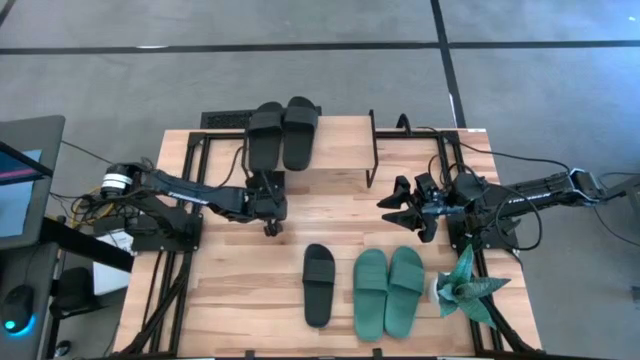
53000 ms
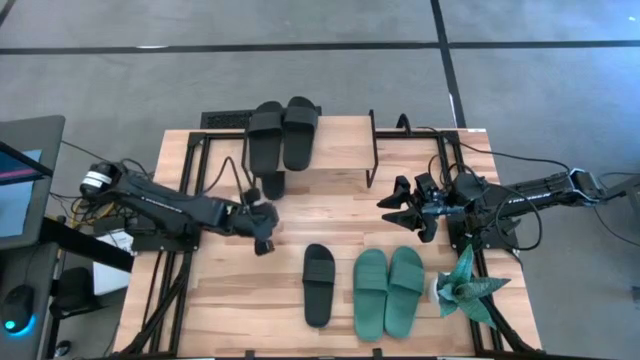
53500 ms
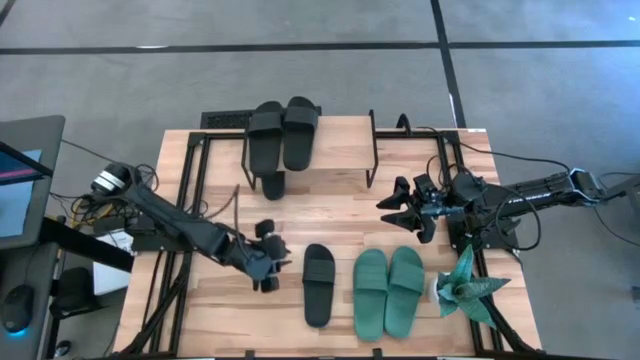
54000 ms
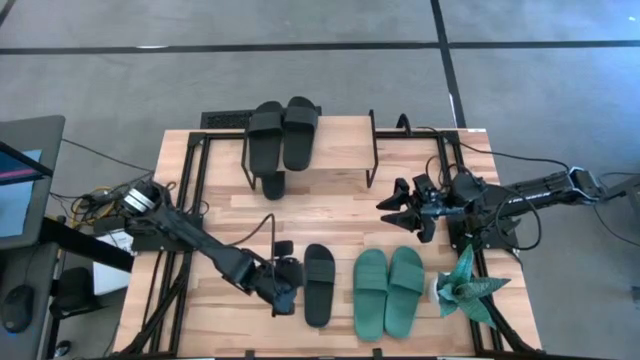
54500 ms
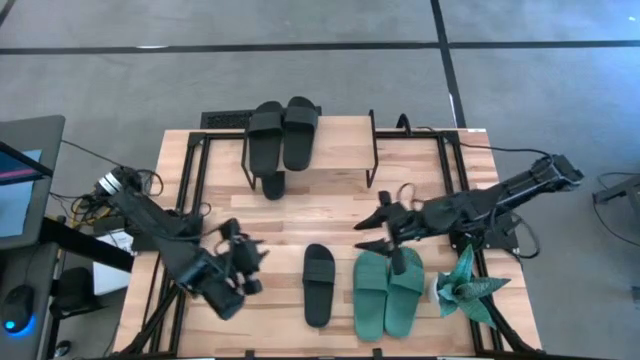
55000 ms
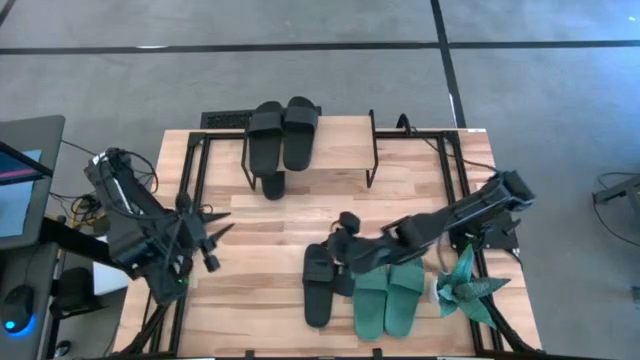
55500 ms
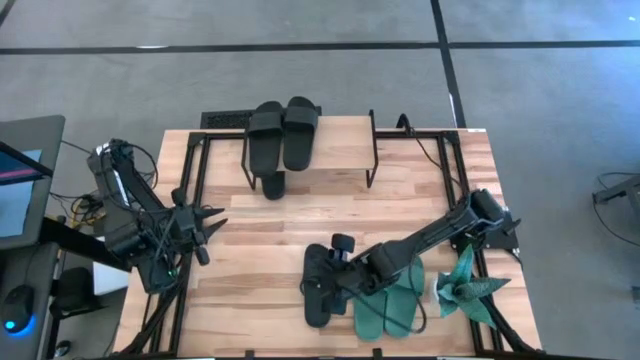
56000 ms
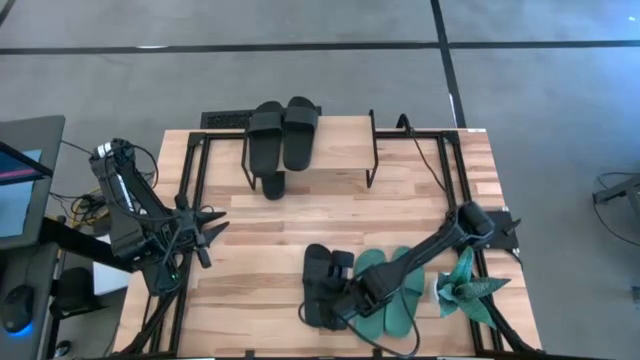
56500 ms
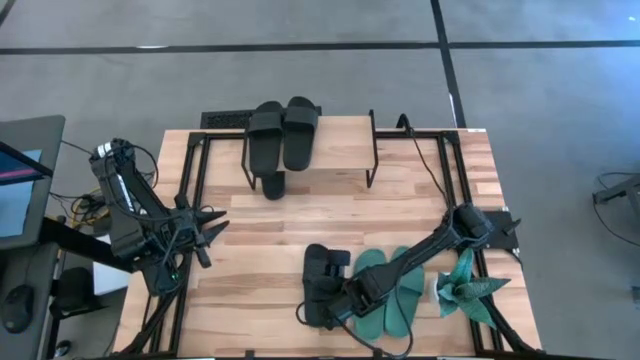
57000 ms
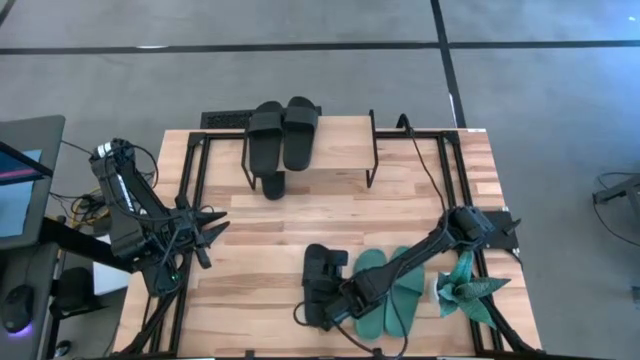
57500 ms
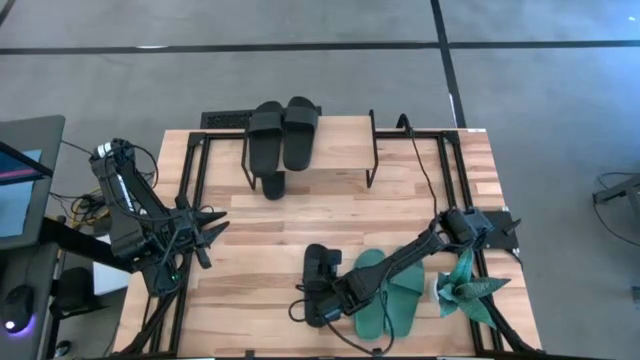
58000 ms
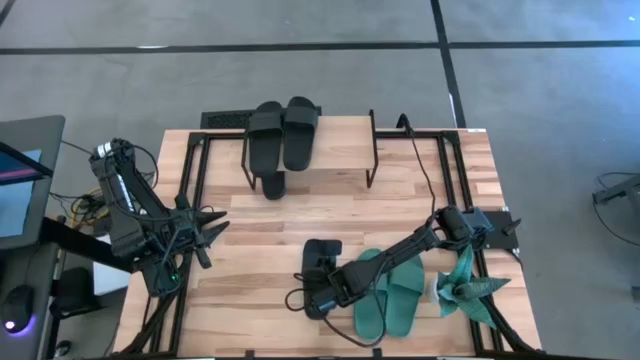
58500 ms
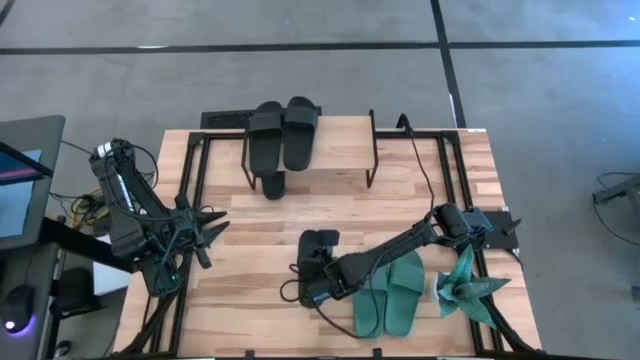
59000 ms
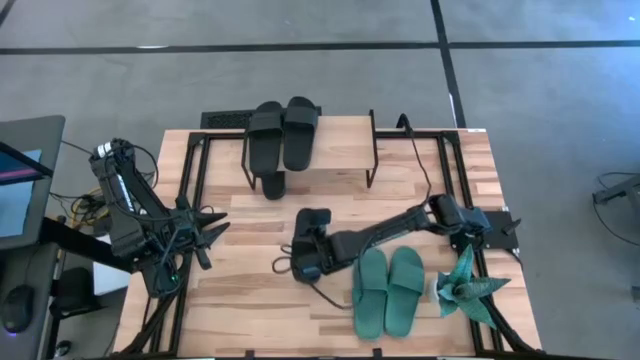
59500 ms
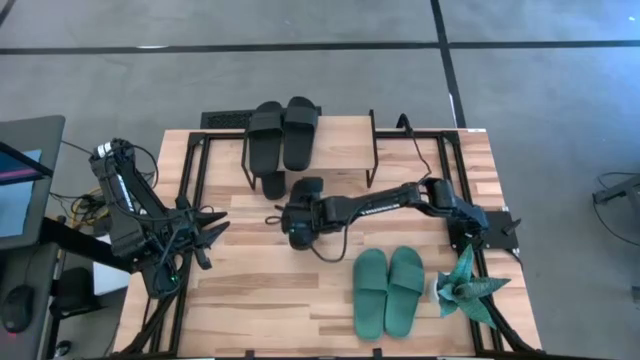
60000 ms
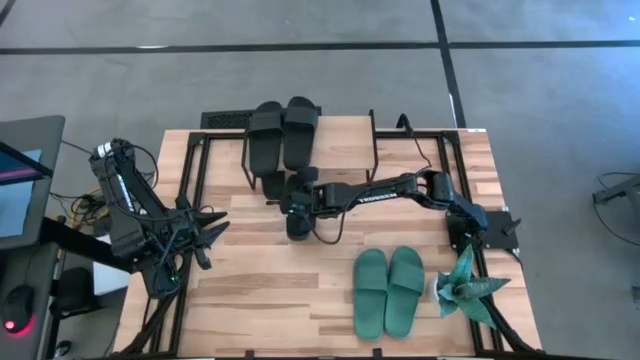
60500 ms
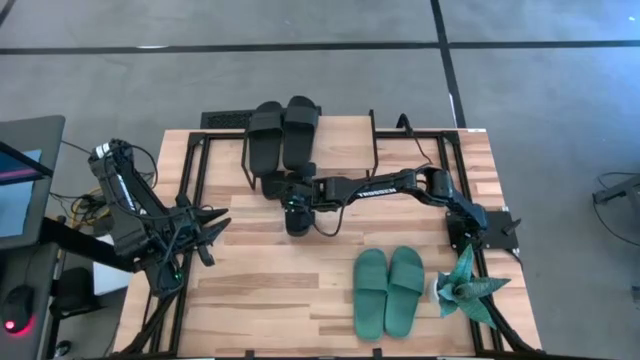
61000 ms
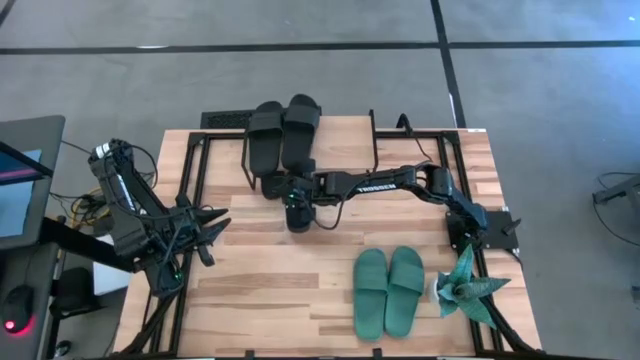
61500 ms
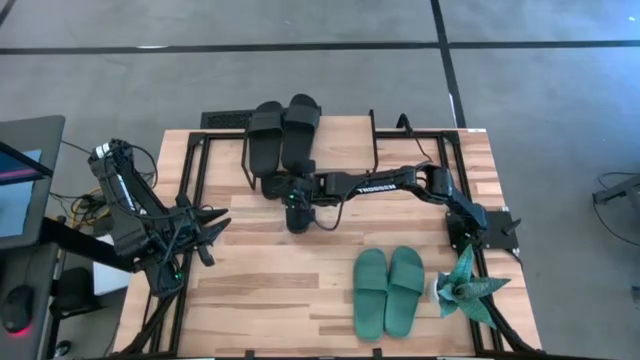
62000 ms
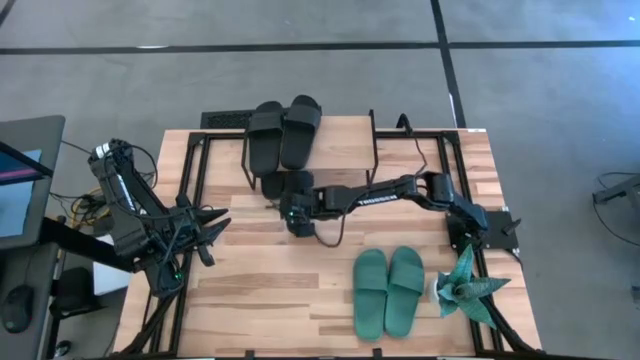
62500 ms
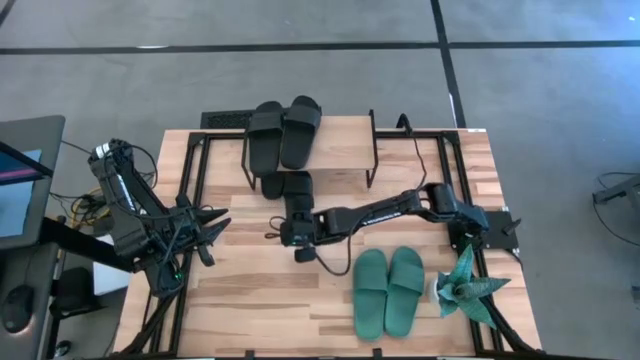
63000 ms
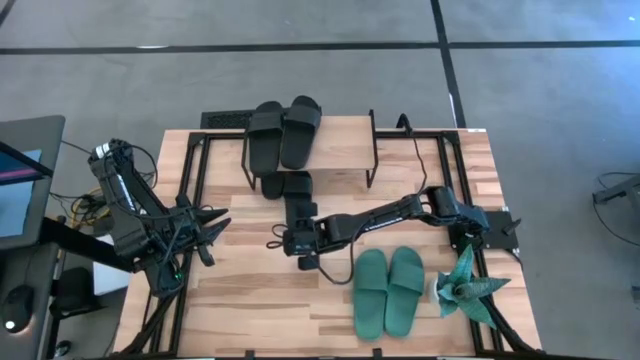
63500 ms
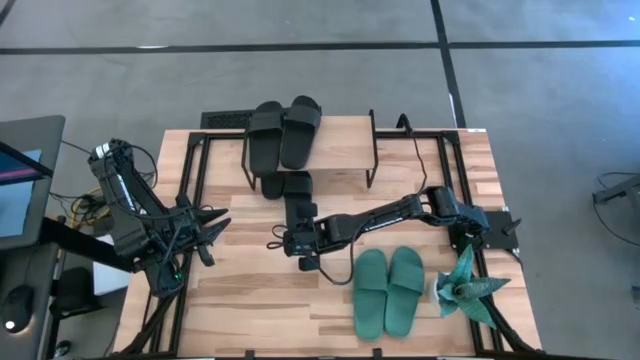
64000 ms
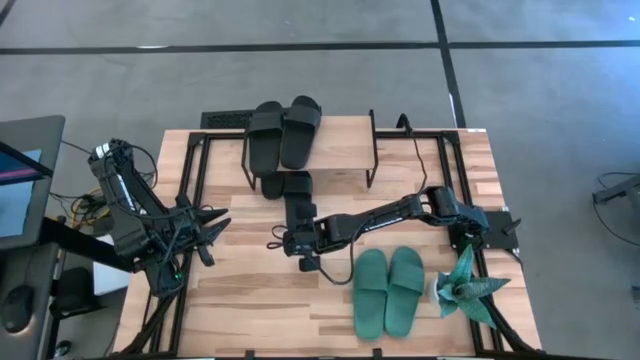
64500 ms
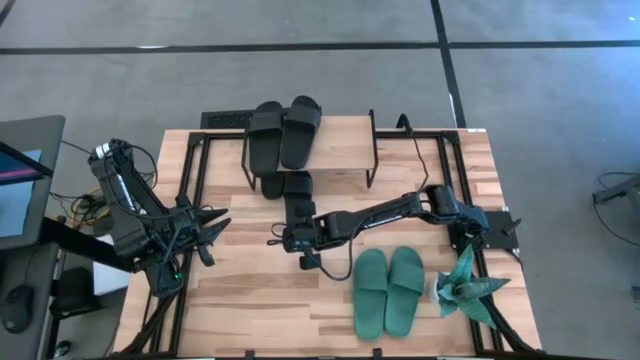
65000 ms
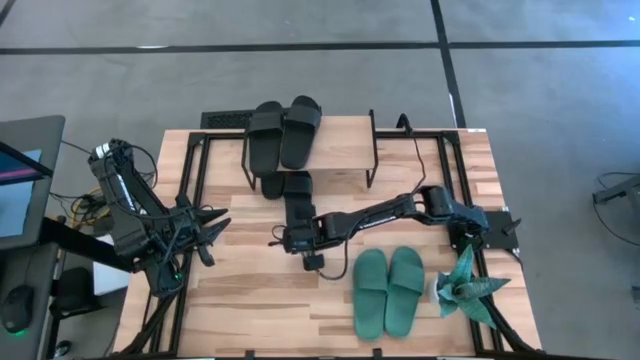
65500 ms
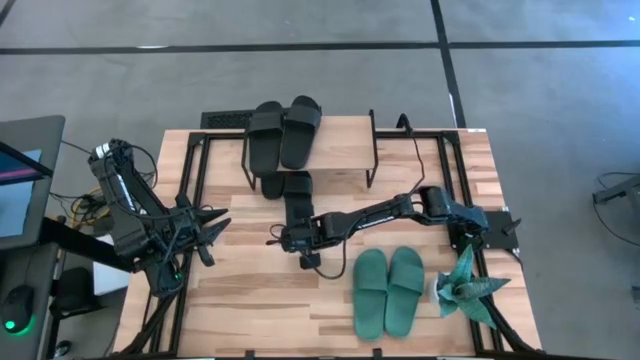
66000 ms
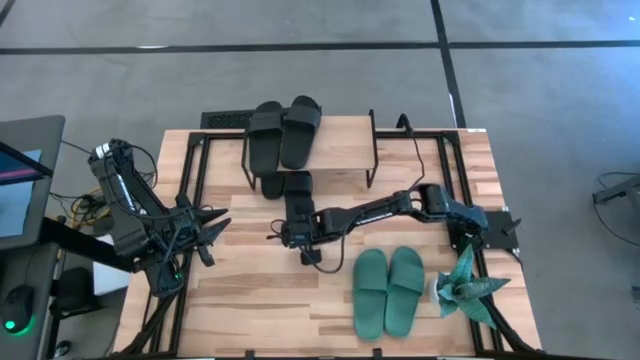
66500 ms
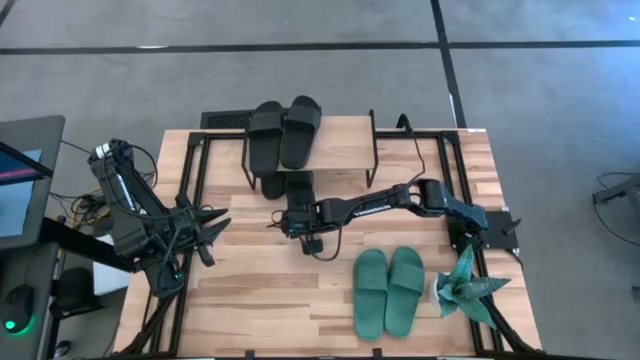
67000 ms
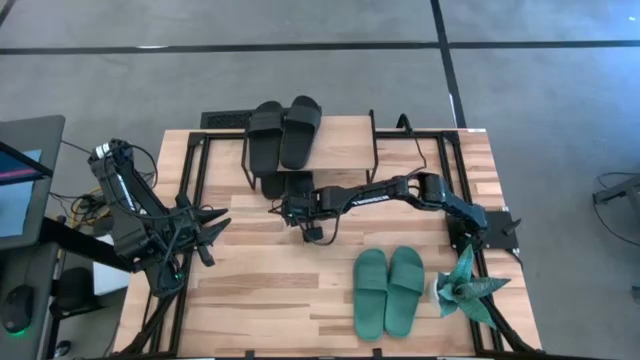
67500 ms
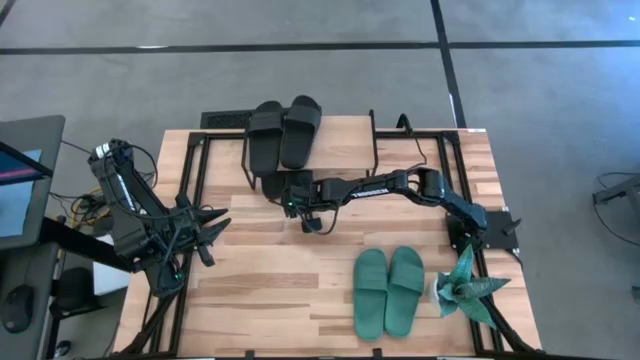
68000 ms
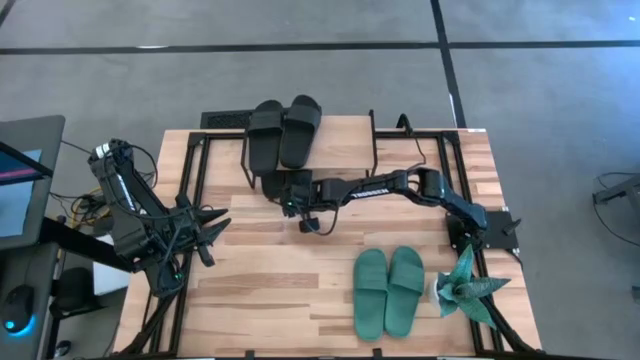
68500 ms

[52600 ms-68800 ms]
Task: Pick and place slides into the shelf
Put the black slipper under the shelf

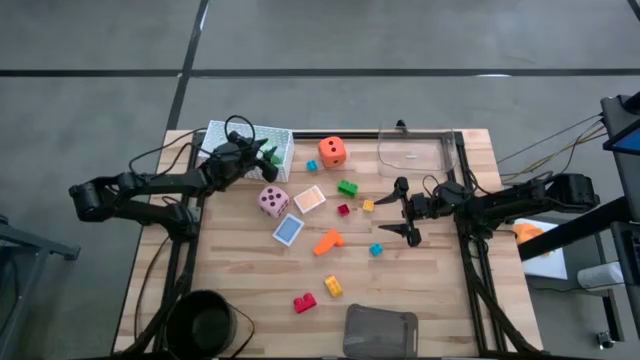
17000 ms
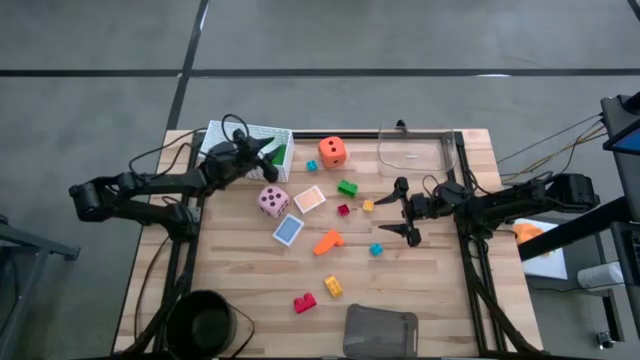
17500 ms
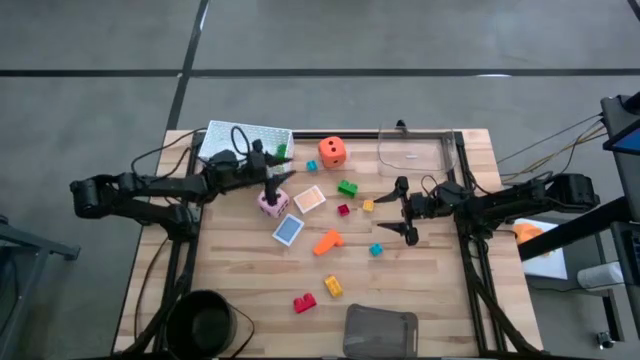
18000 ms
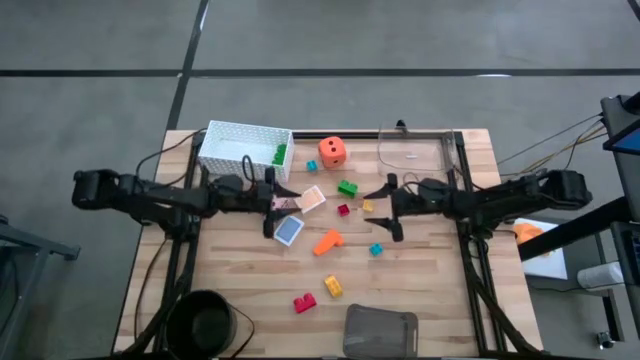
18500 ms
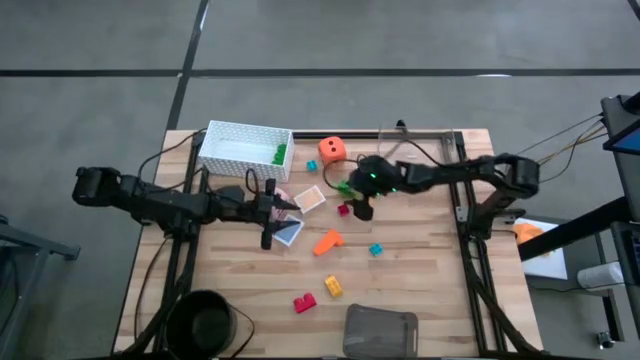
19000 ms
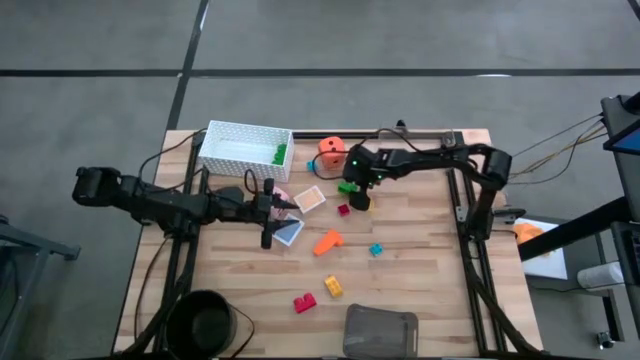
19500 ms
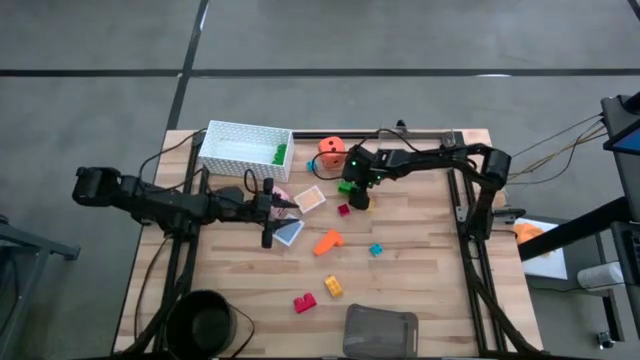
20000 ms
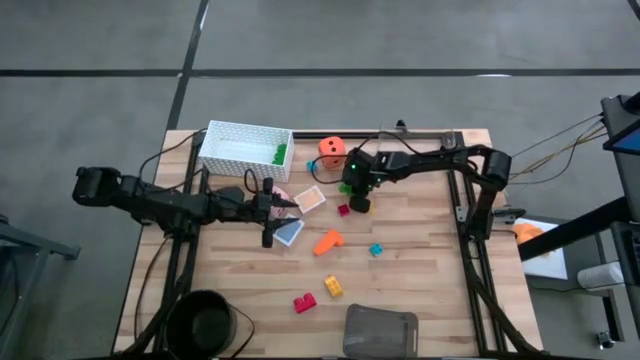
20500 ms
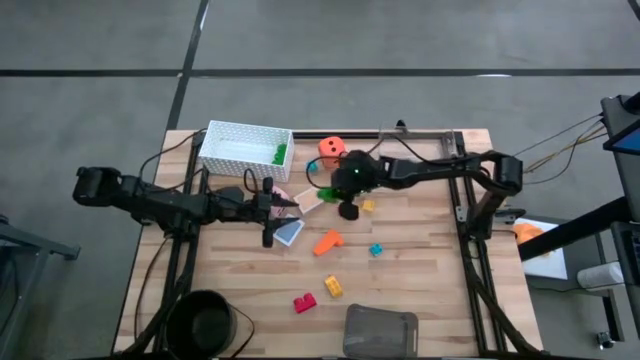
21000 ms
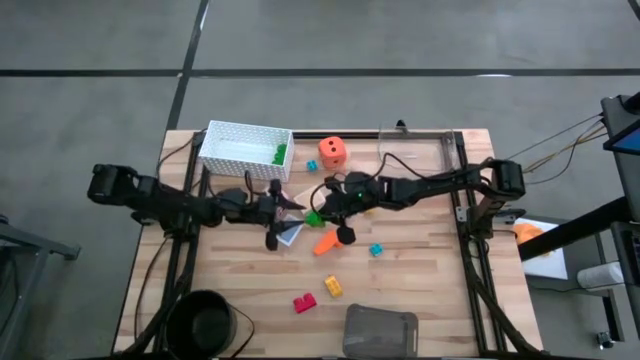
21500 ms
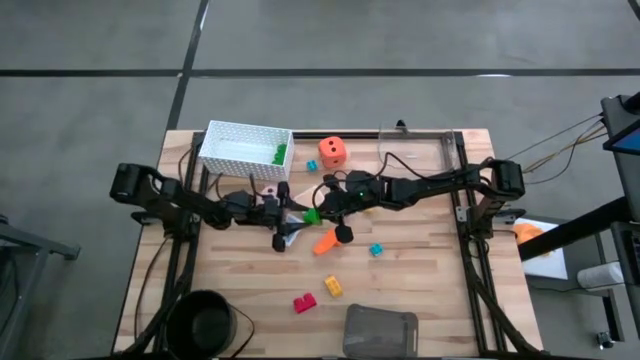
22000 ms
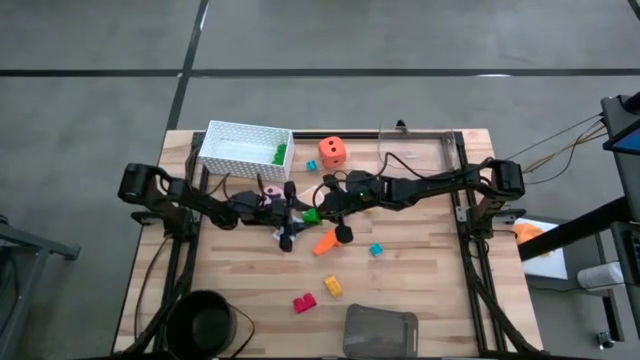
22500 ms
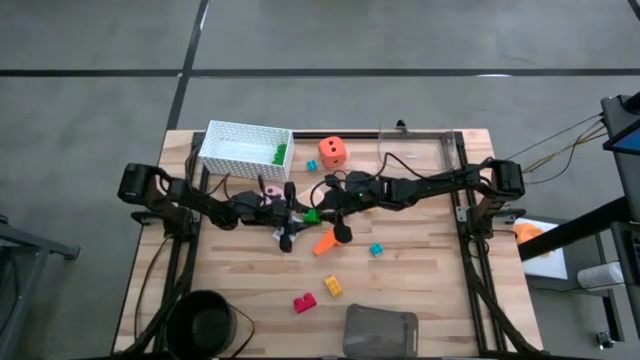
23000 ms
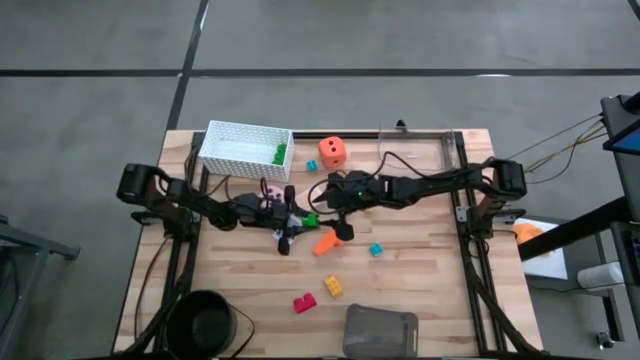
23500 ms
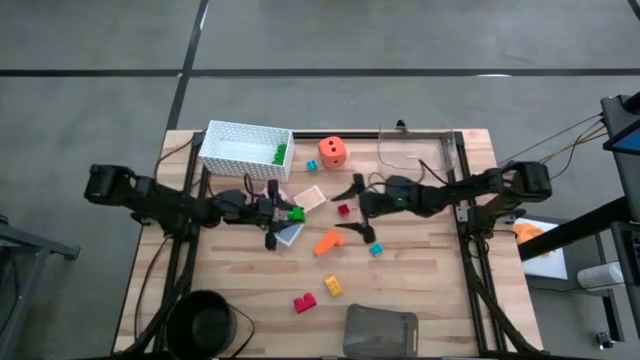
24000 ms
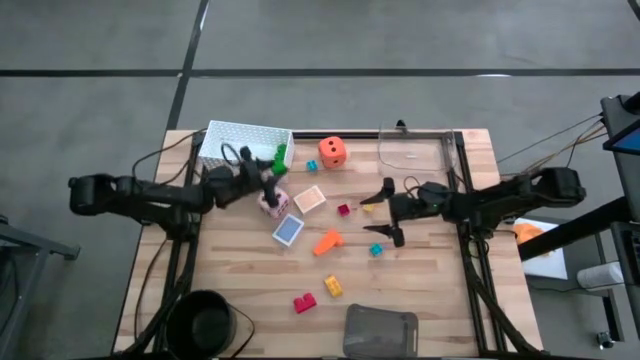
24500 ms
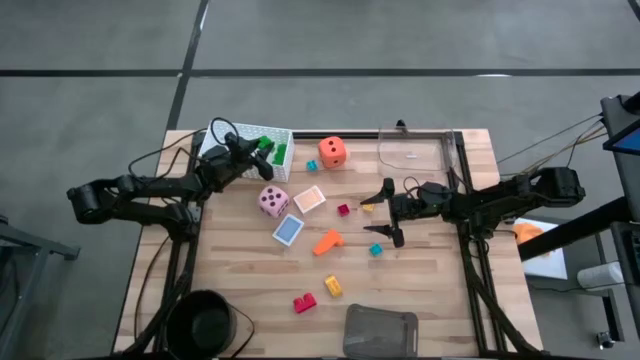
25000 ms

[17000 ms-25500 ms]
Task: Pick & Place Toys
Put the large green game piece into the white bin
